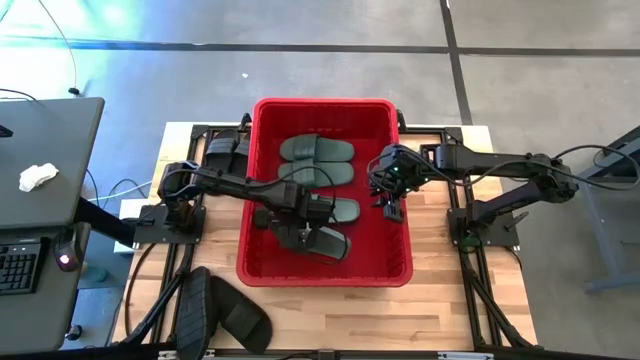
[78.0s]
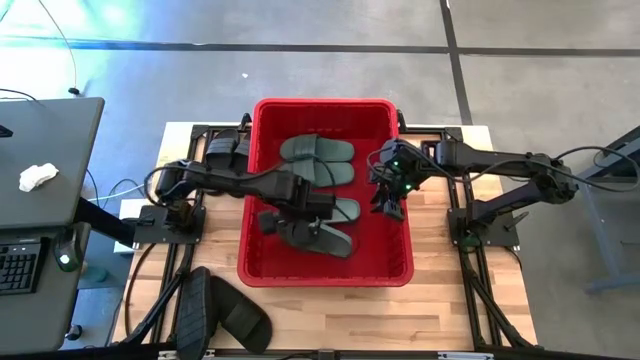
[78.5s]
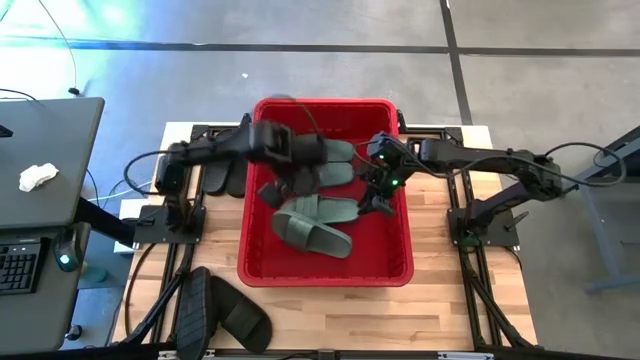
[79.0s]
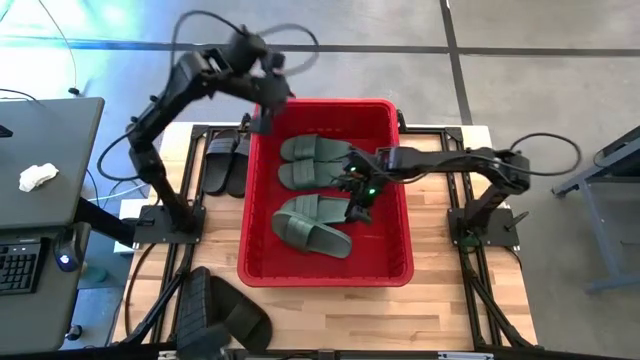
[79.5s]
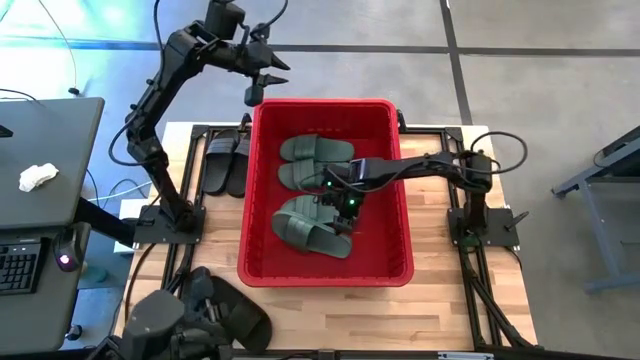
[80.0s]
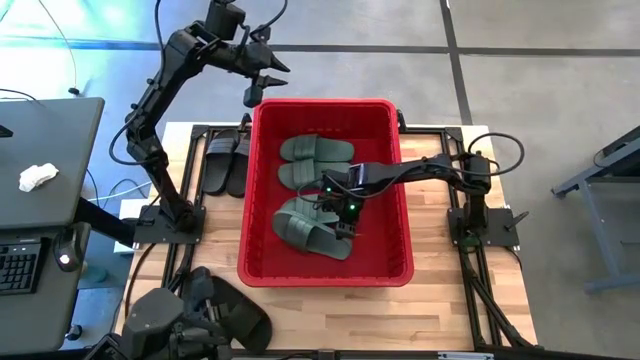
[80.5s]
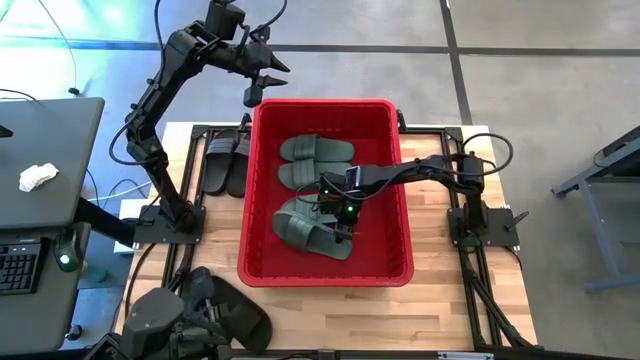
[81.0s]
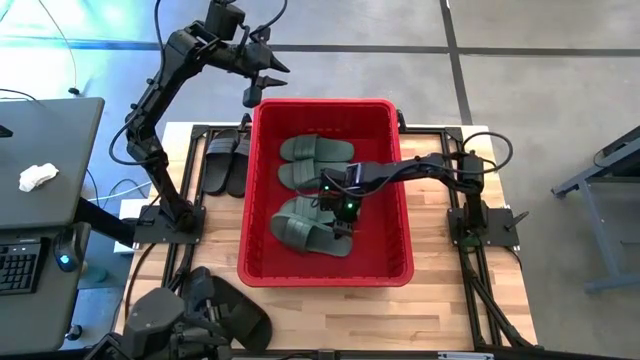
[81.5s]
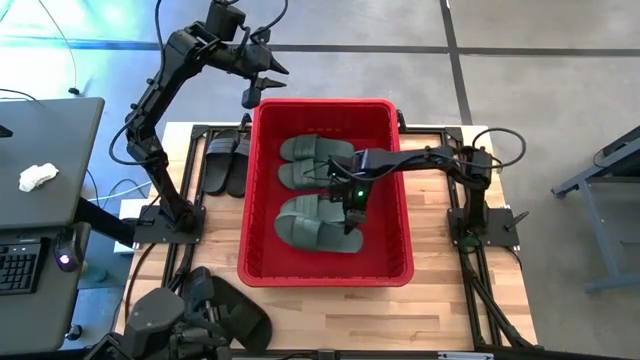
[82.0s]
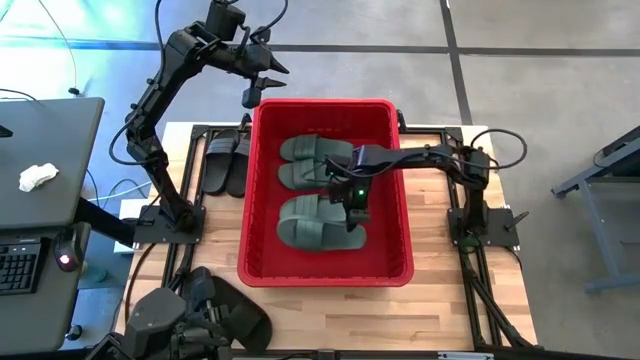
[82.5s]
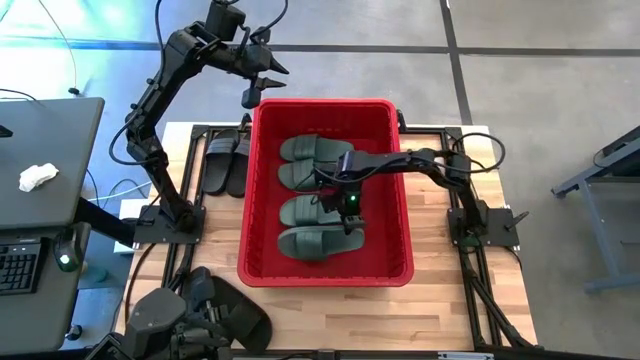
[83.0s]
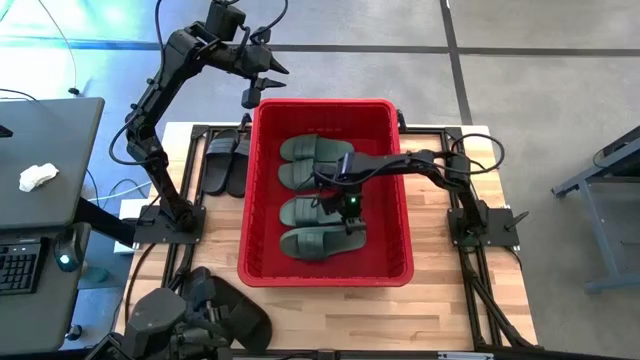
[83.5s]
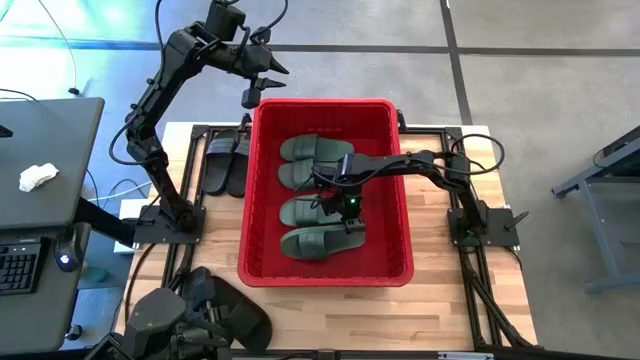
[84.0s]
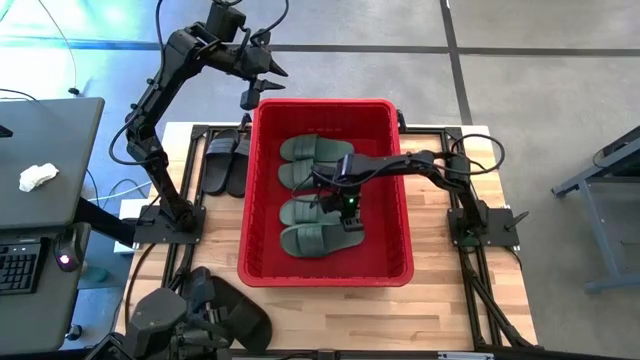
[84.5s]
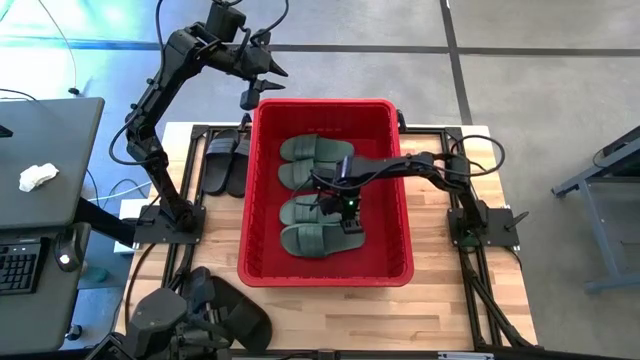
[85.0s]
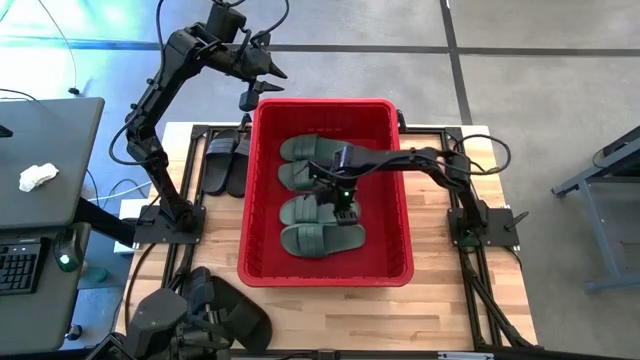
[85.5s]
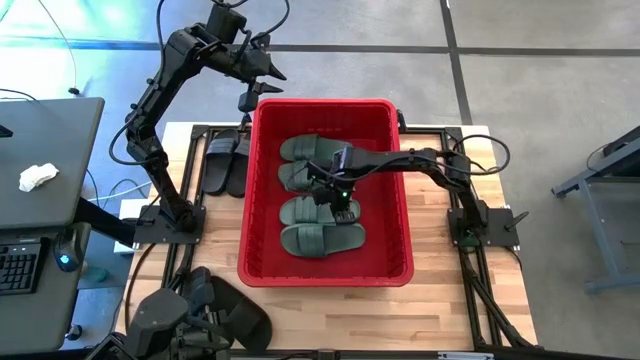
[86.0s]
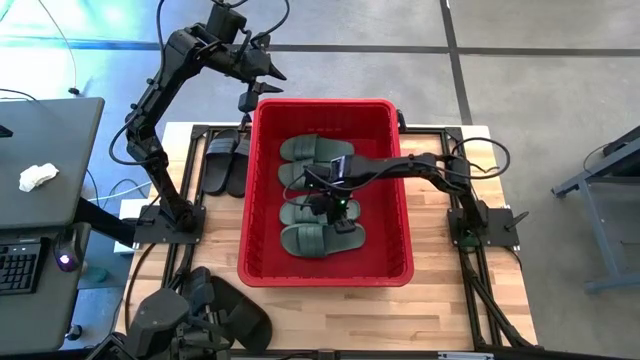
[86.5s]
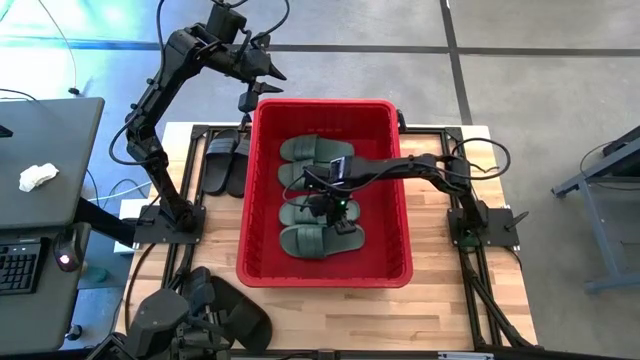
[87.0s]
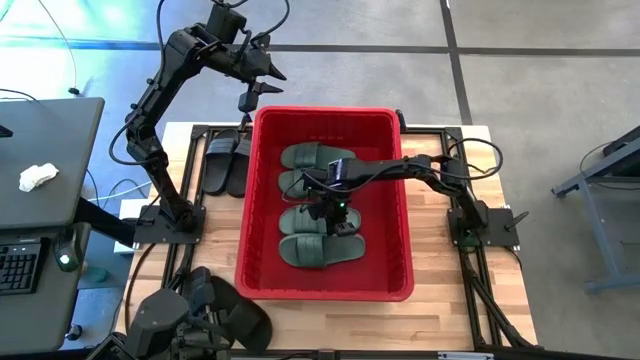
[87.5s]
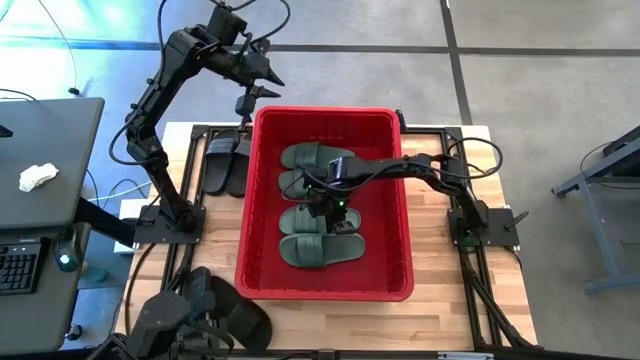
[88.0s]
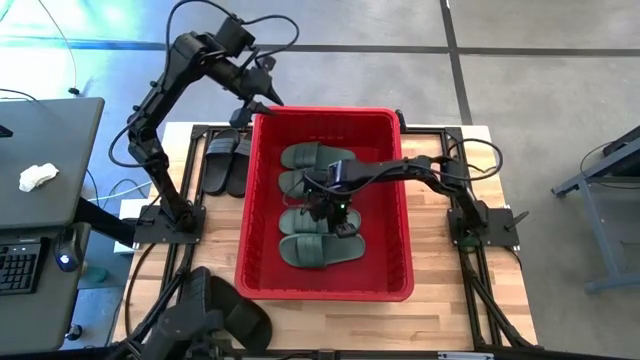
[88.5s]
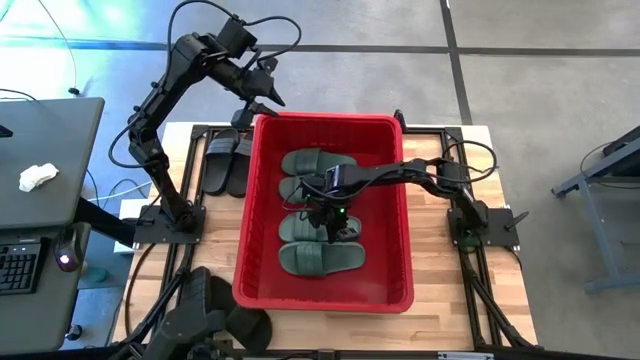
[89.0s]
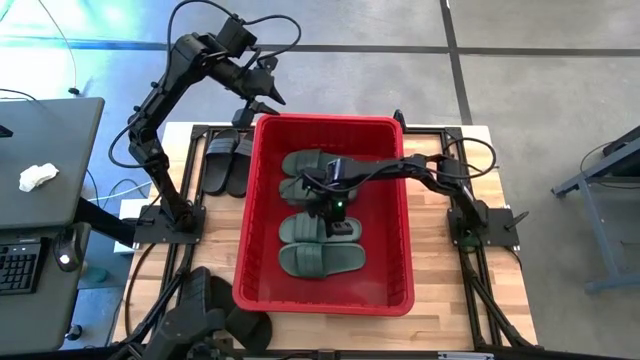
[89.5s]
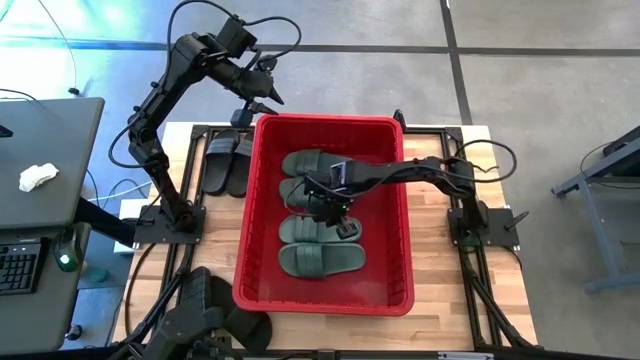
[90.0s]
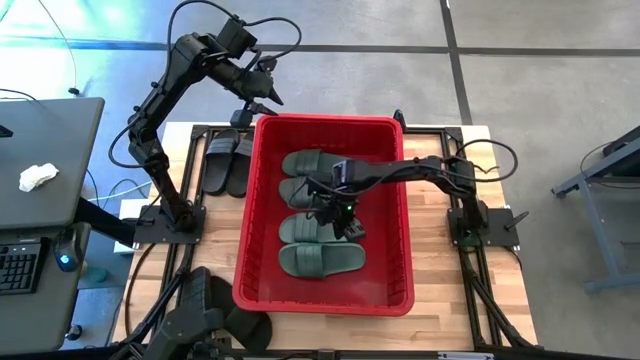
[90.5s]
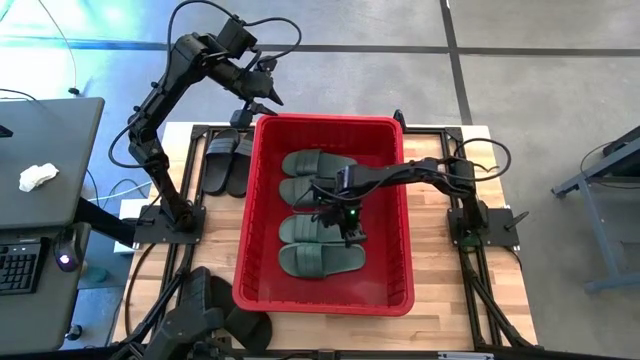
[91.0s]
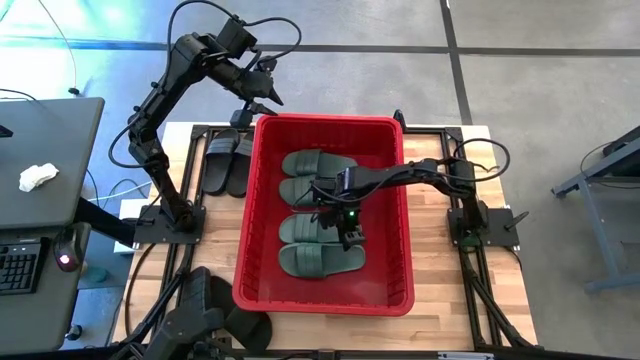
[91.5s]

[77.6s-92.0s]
Task: Pick and place slides into bin
Put the green slide into the red container

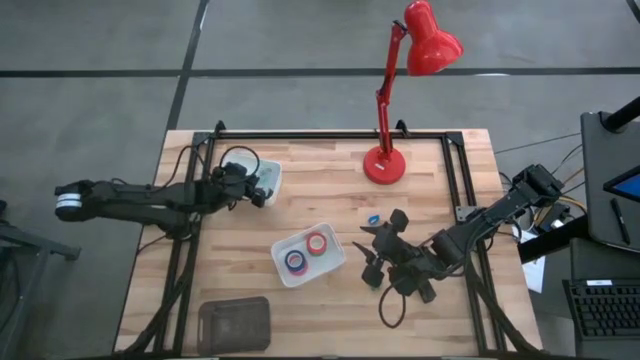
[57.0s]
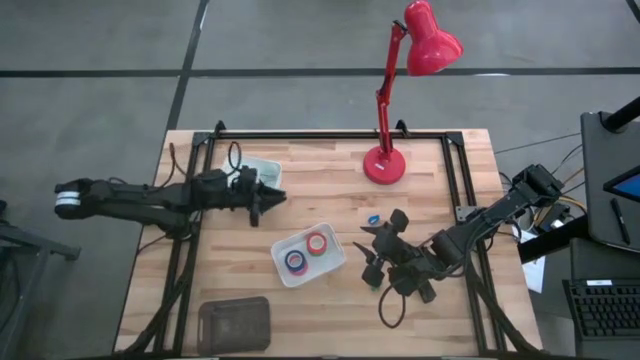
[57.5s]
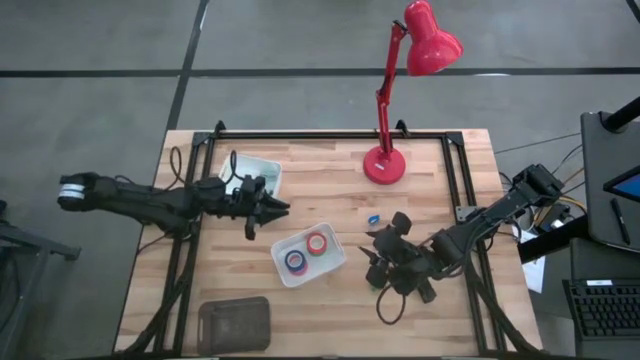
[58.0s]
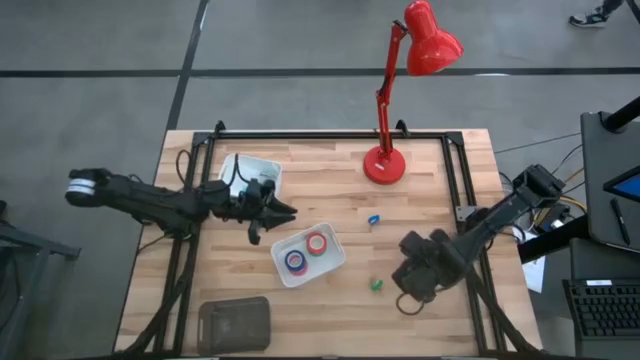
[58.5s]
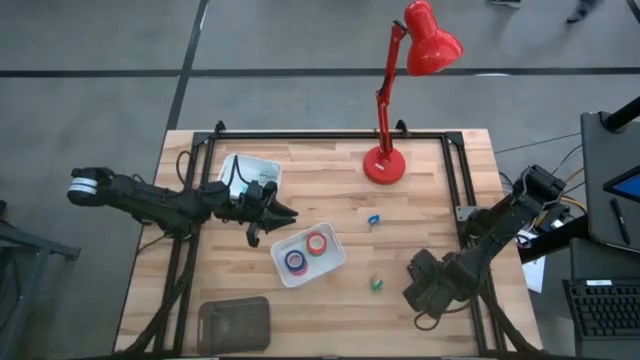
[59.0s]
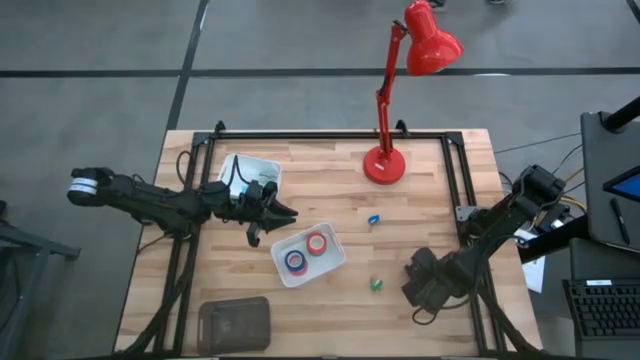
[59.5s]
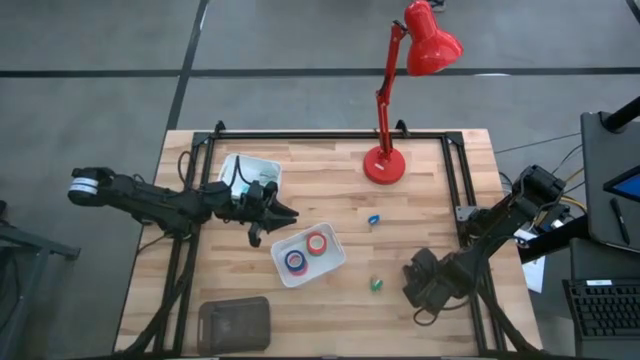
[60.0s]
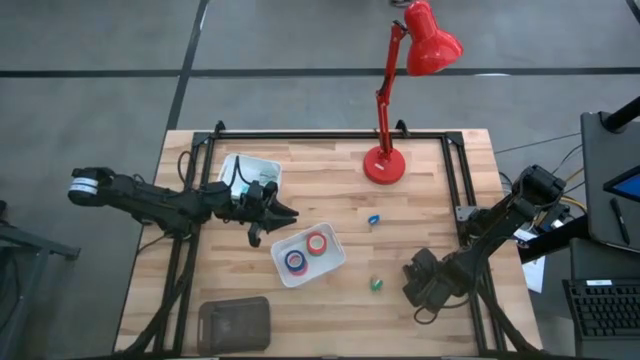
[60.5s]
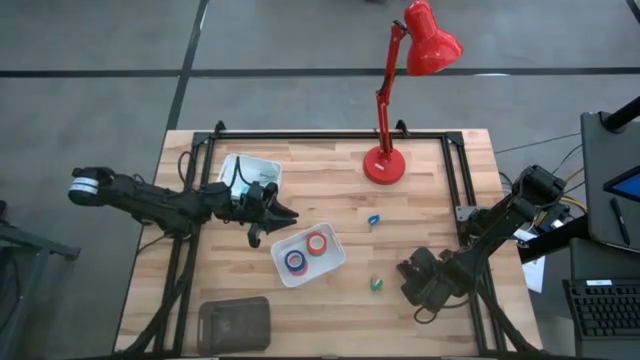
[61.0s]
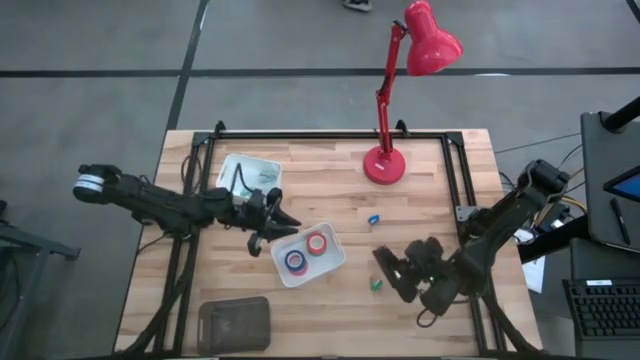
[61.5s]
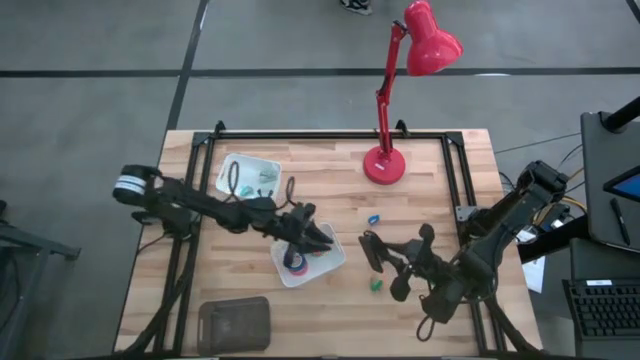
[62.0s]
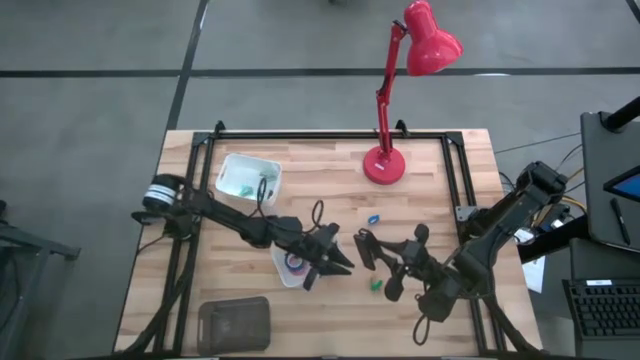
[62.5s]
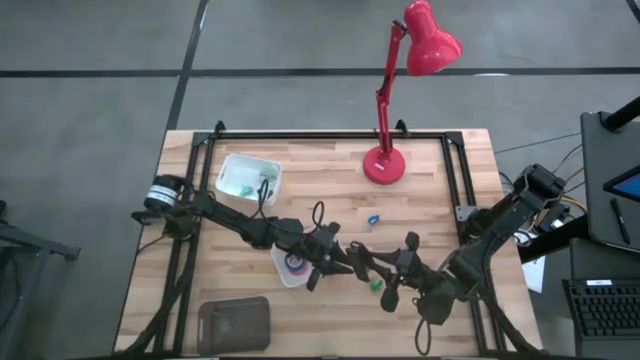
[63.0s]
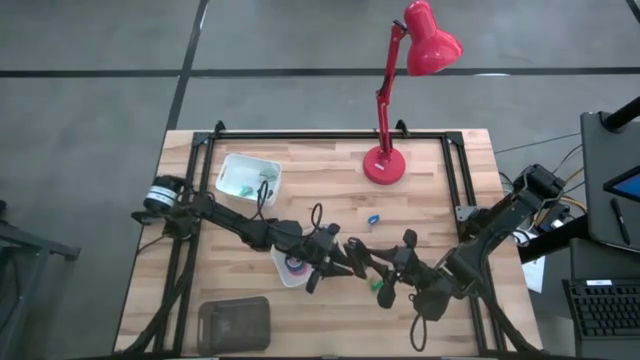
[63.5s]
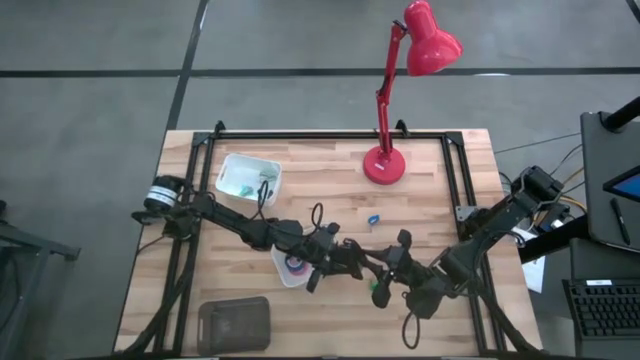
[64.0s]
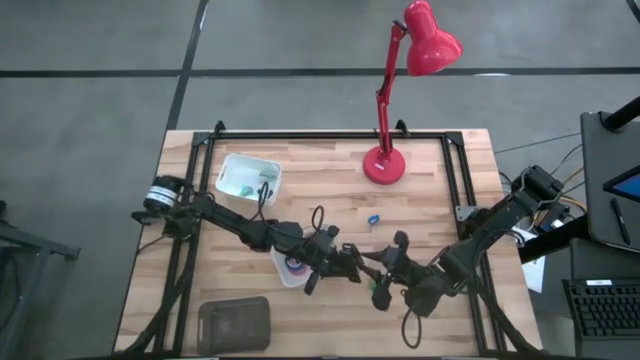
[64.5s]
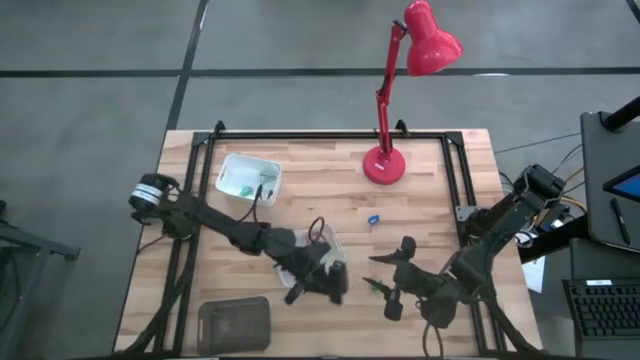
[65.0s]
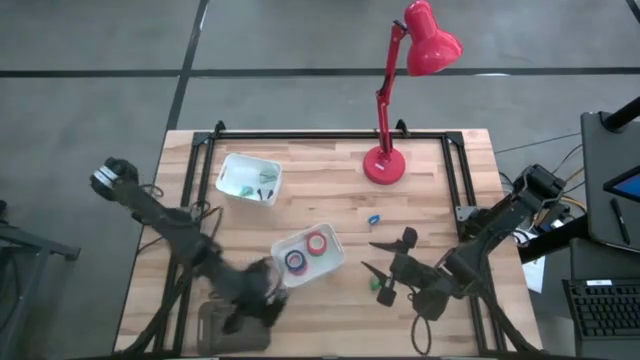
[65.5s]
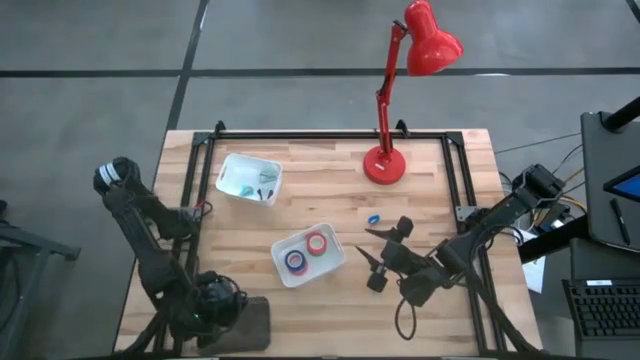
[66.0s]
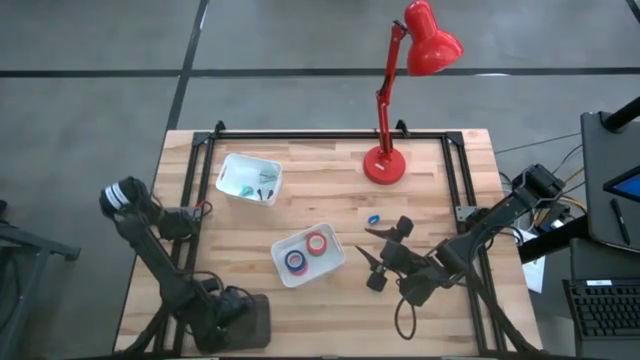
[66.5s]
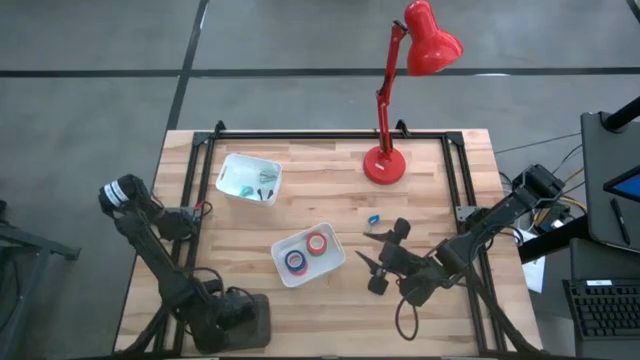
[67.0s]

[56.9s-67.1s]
Task: Pick and place Stapler, Stapler remover, tape
Put the black stapler into the black bin
